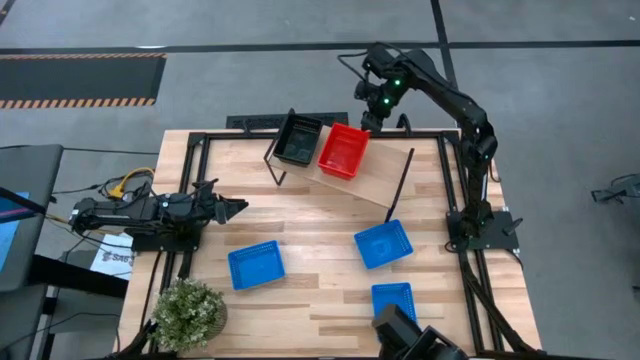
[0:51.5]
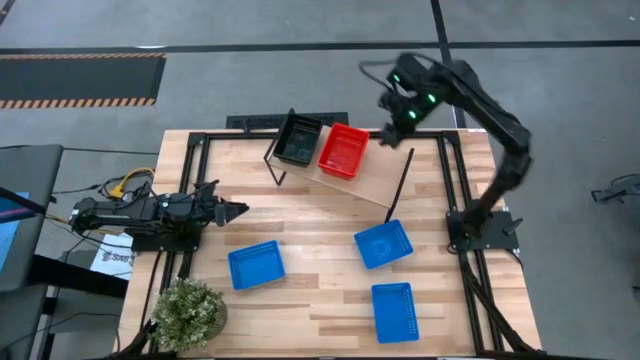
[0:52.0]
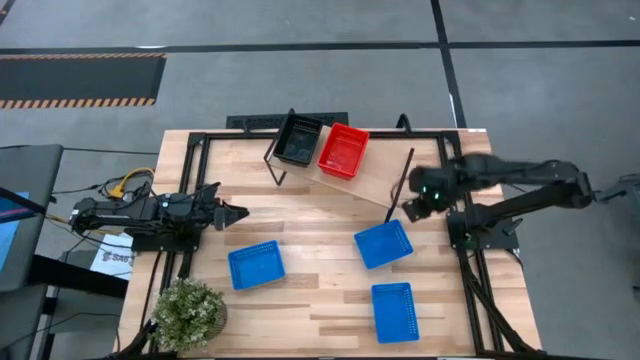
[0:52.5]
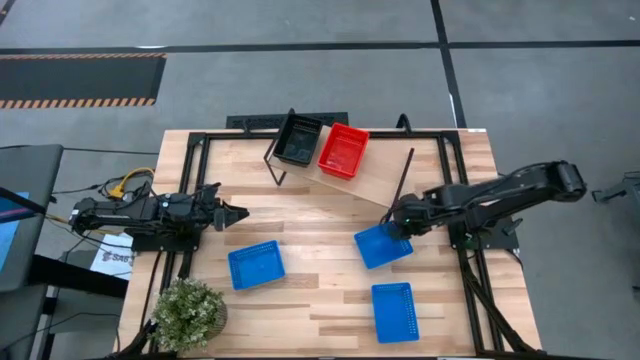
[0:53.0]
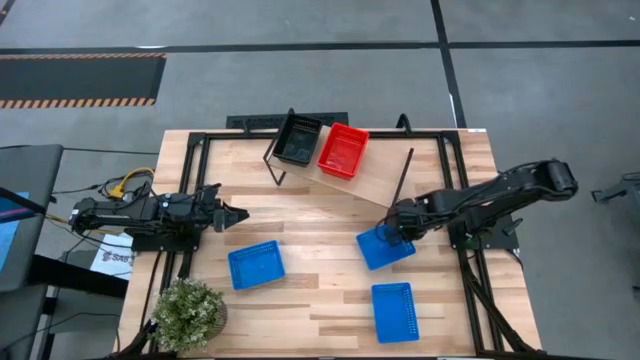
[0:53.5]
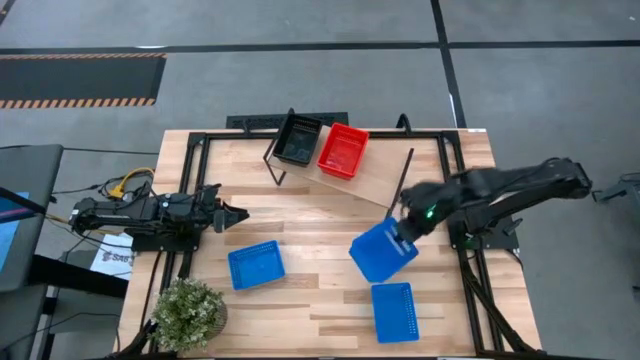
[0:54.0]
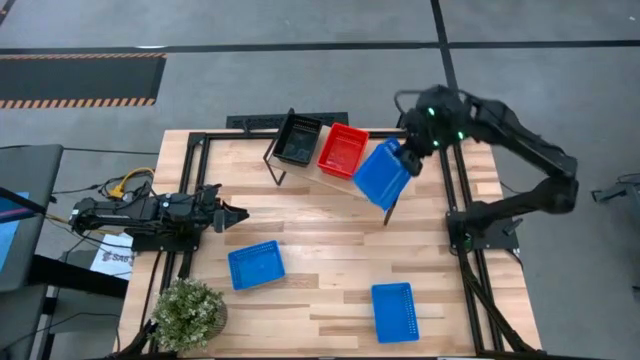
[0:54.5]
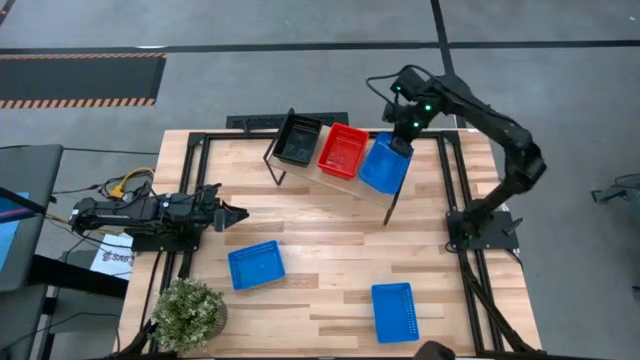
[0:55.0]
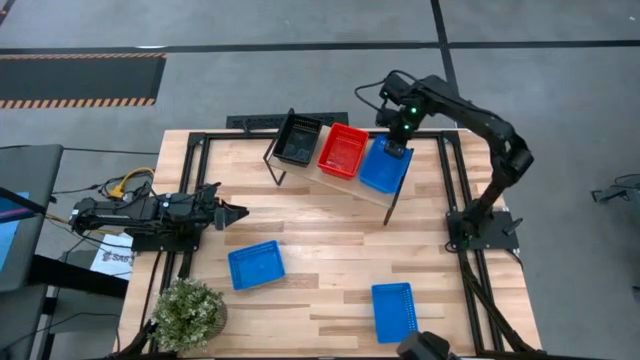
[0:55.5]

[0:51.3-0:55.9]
Task: Stack baskets on shelf by color
Put the top right blue bin on the shelf

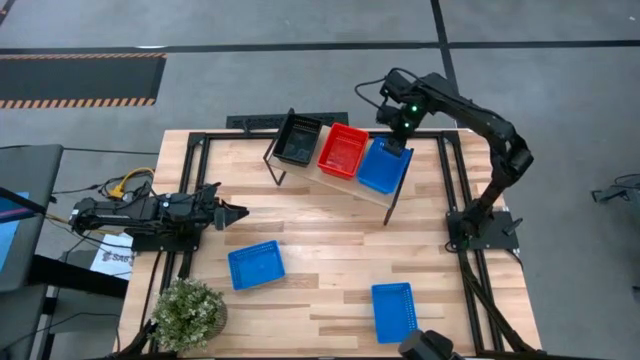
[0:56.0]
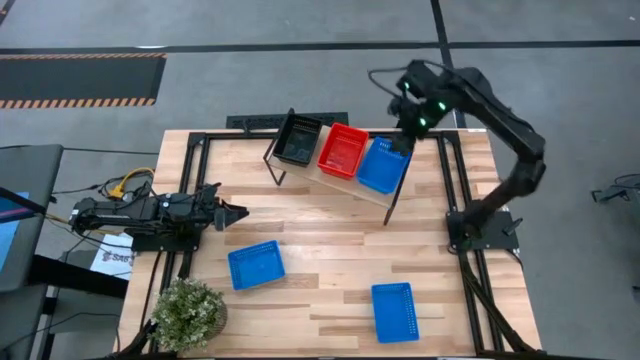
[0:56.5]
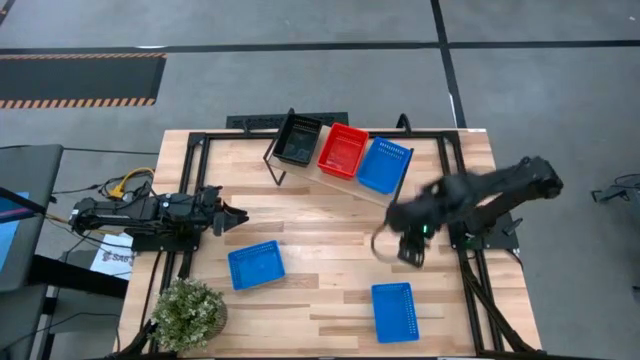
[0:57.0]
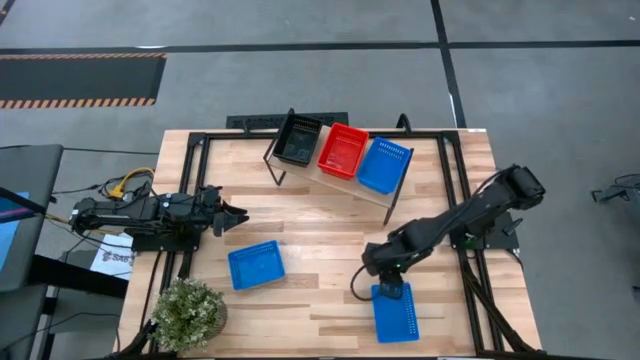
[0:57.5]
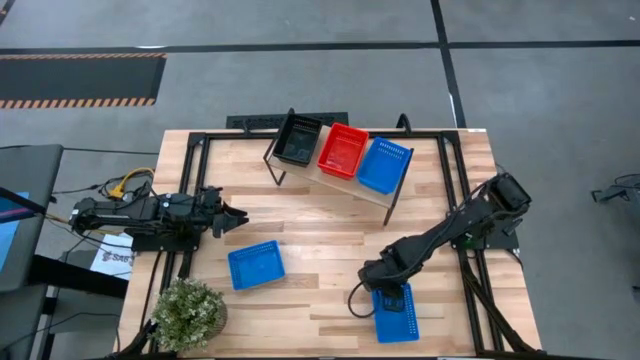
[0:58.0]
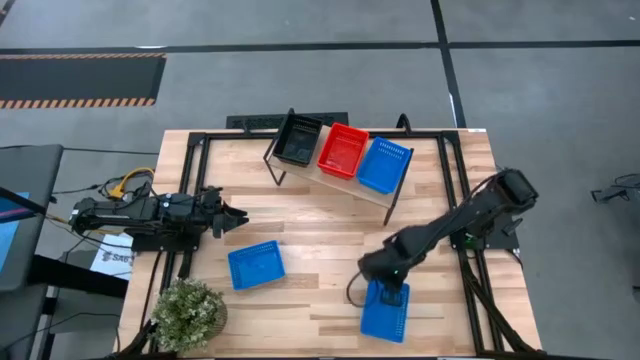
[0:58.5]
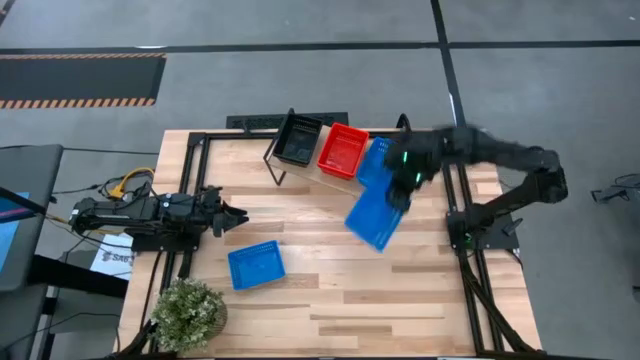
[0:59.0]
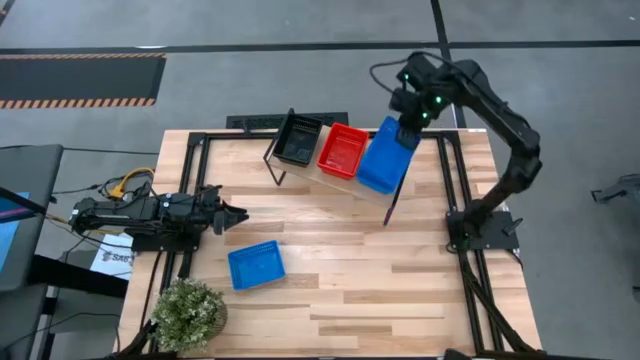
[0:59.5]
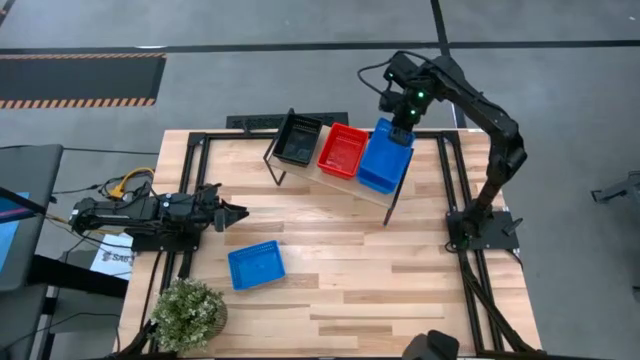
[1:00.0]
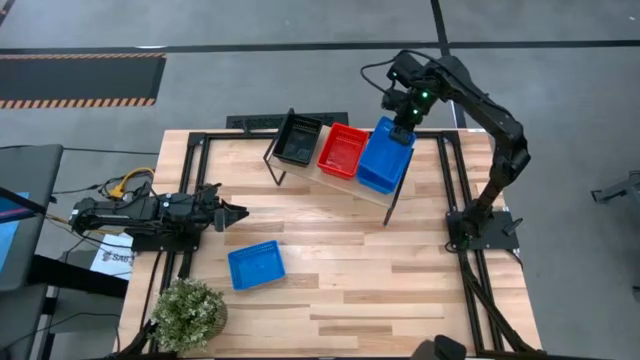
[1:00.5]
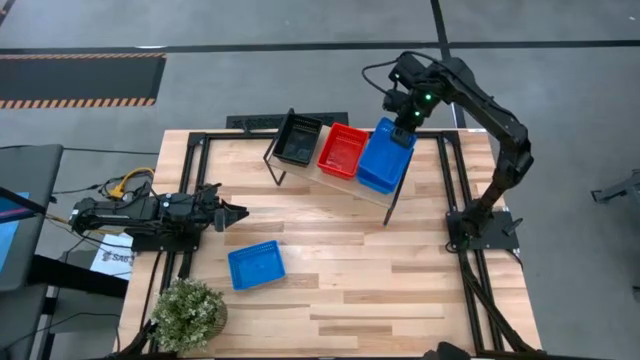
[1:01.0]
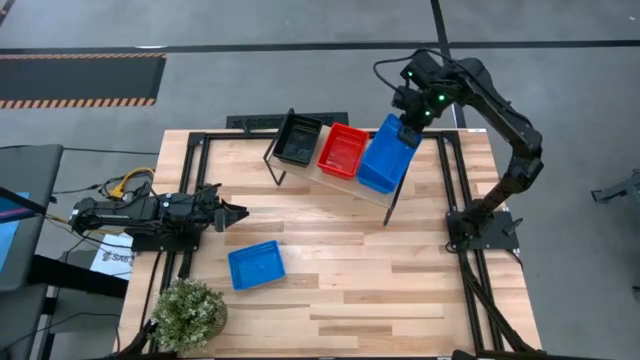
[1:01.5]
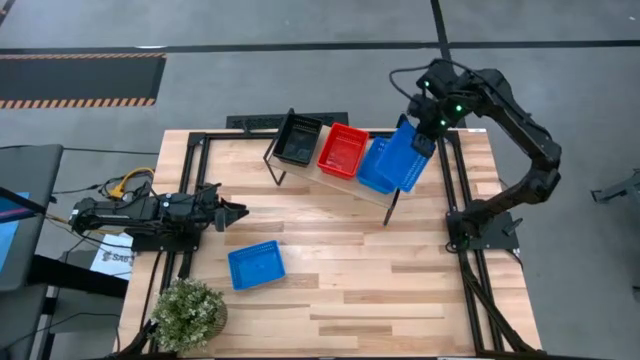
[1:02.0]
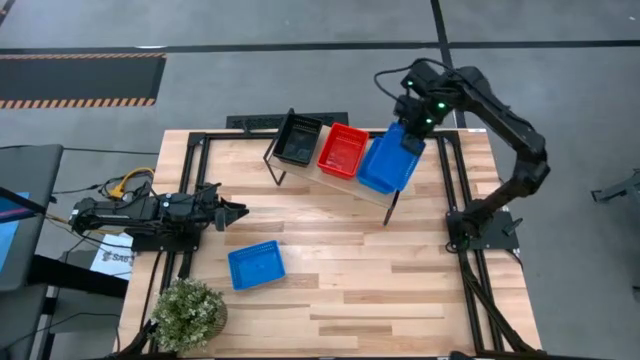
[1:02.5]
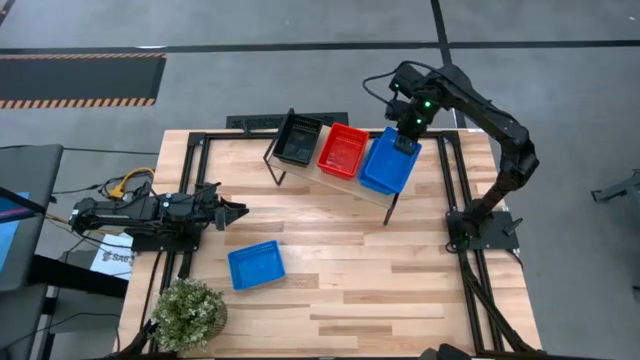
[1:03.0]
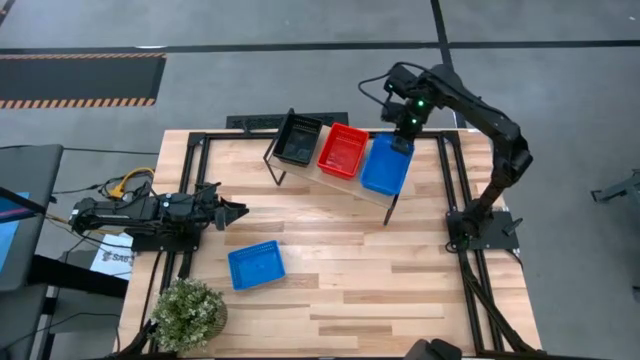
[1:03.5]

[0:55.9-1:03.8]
Stack the bottom blue bin on the blue bin on the shelf

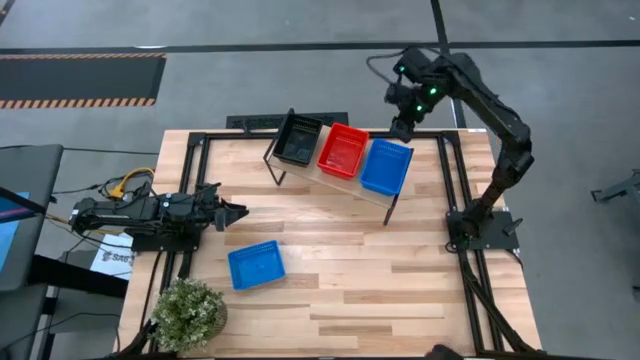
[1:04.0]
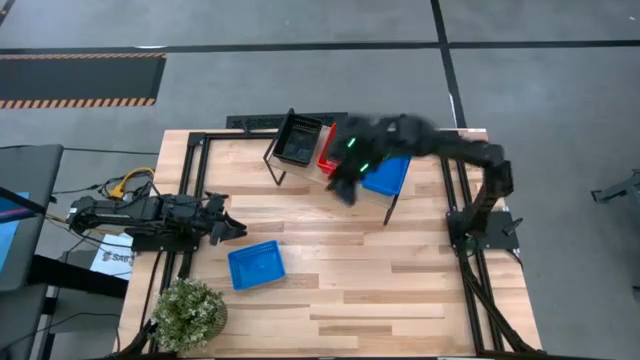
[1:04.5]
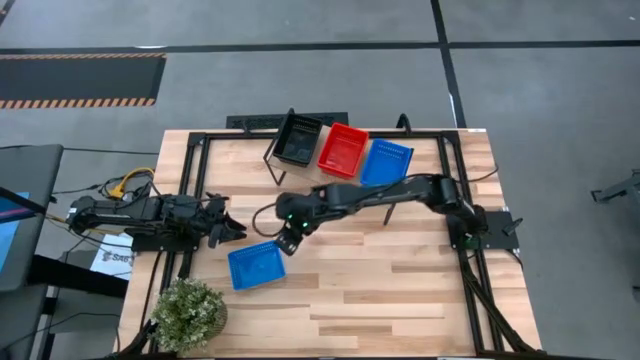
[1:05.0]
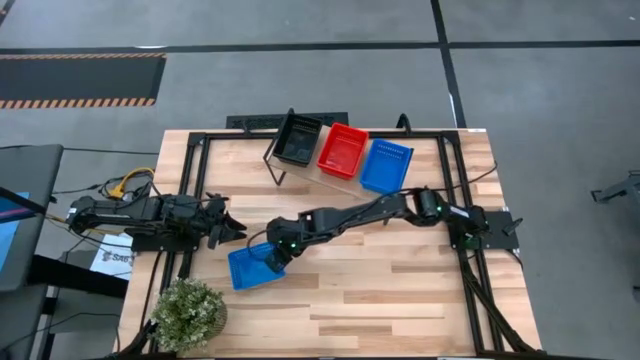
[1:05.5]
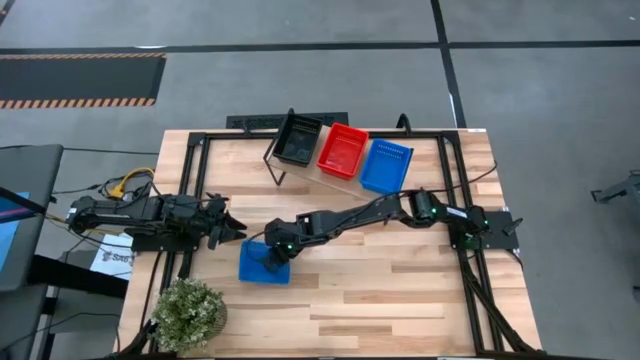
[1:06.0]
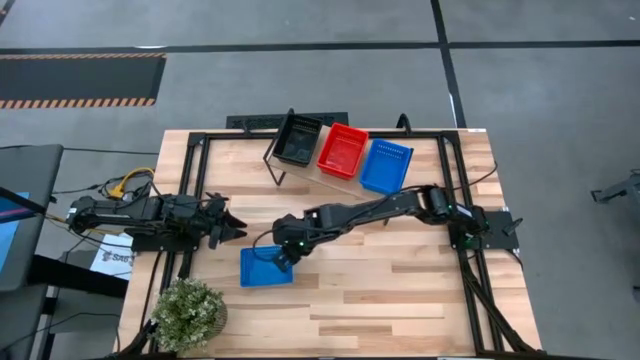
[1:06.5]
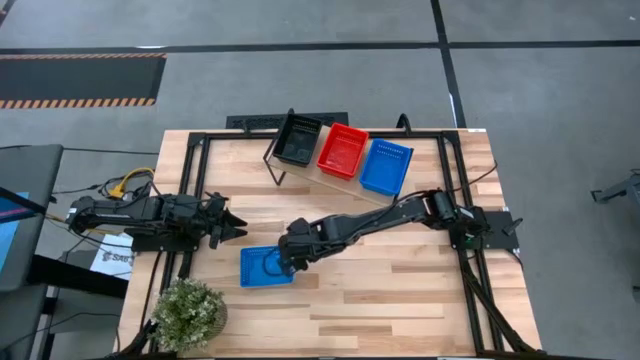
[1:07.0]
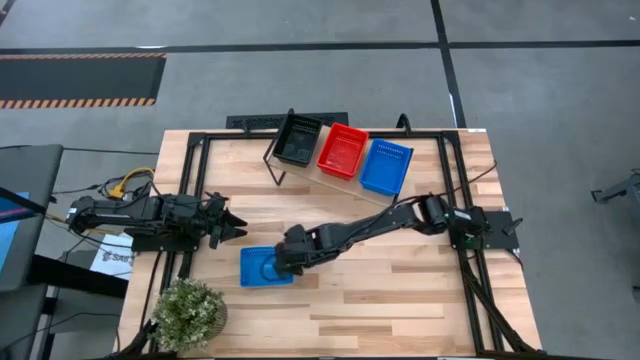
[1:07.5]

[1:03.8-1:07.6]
Stack the blue bin on the blue bins on the shelf

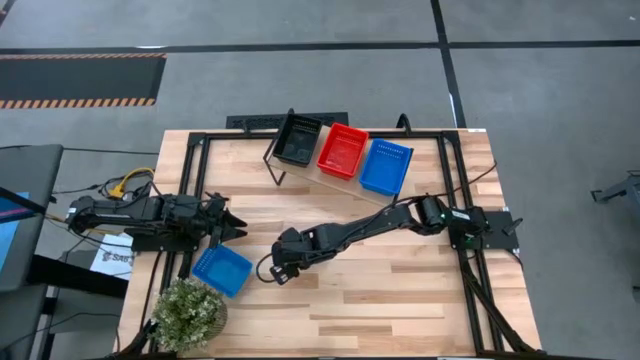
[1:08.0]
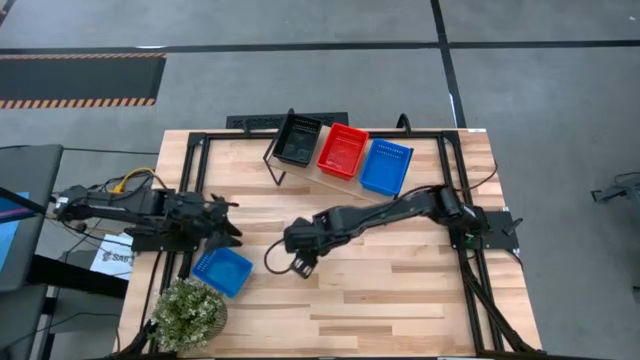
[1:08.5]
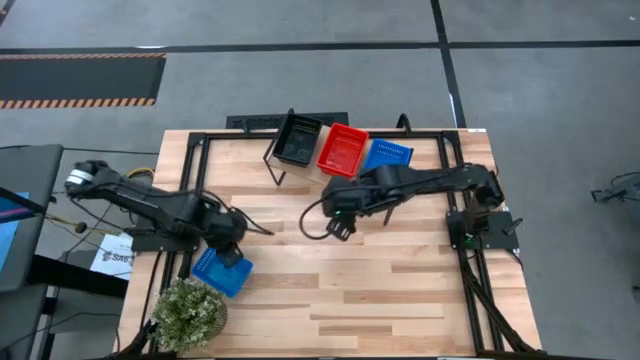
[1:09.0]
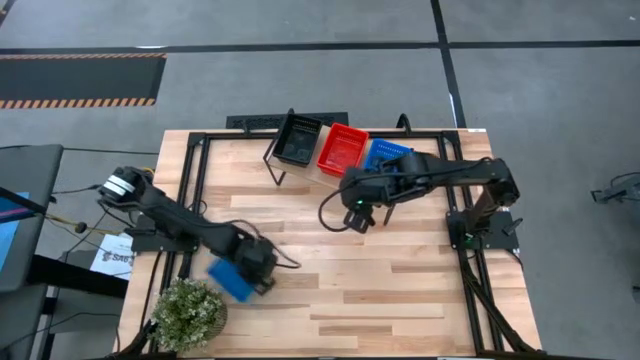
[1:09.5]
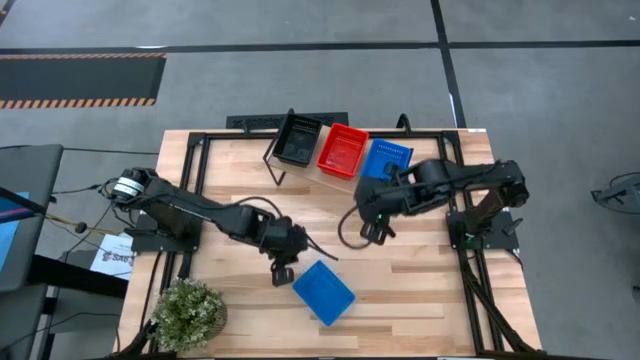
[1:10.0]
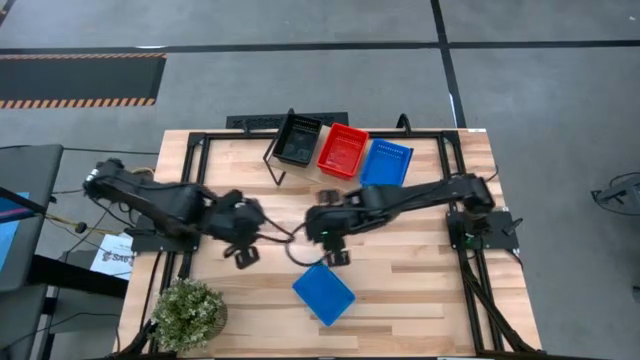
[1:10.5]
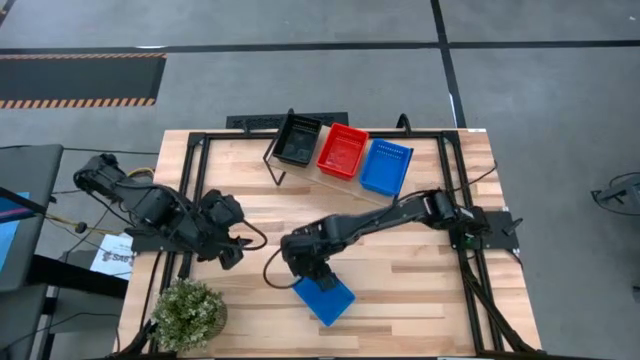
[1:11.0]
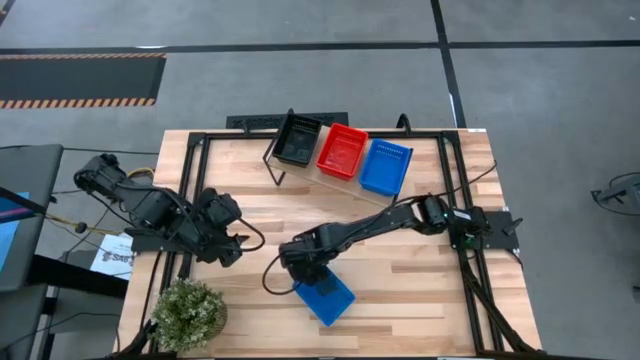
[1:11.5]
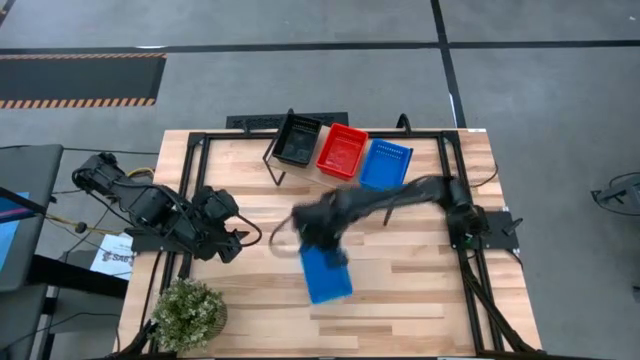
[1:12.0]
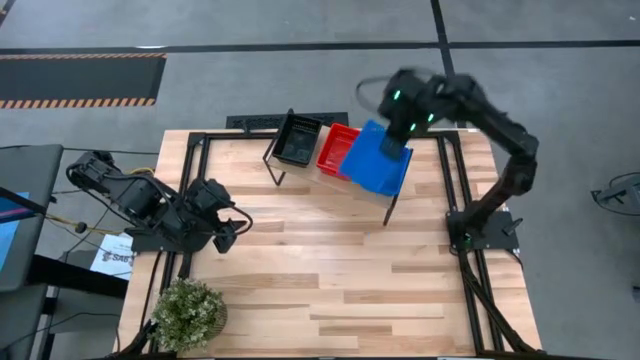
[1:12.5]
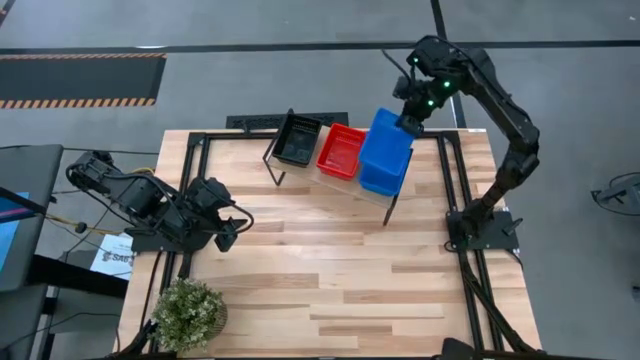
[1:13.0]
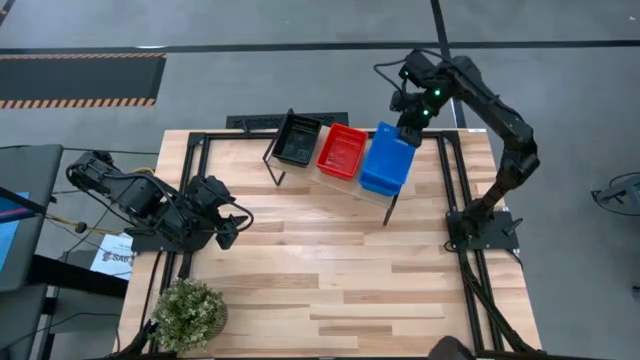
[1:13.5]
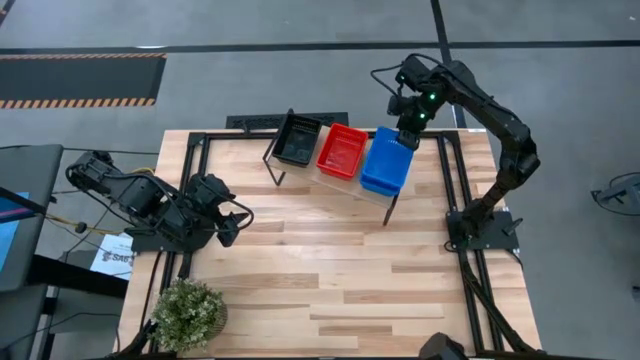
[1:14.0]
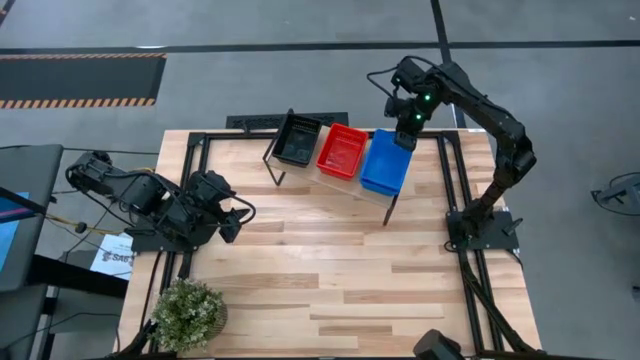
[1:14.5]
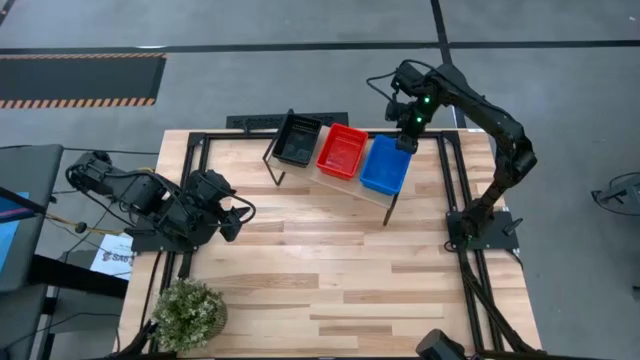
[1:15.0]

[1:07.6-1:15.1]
Stack the blue bin on the blue bins on the shelf
